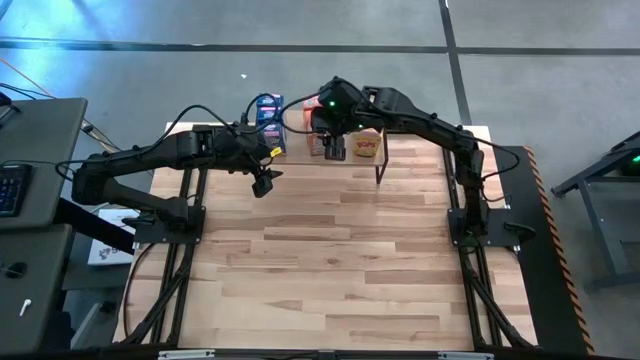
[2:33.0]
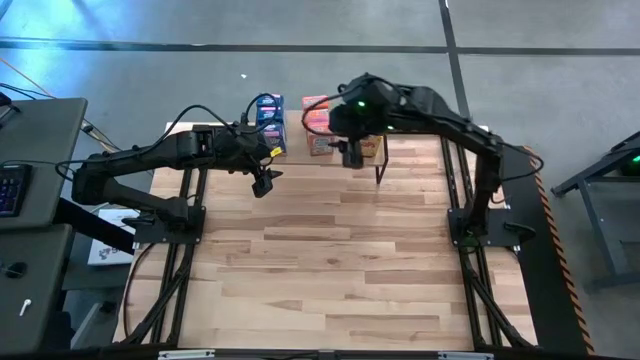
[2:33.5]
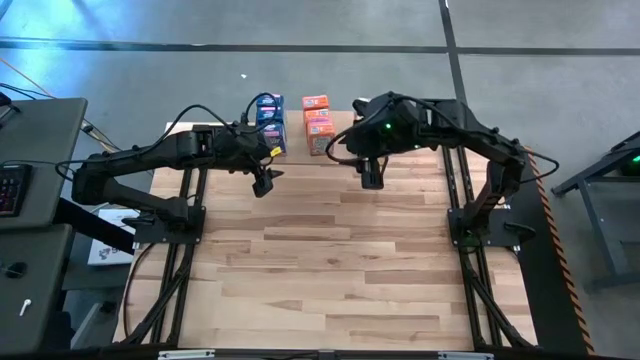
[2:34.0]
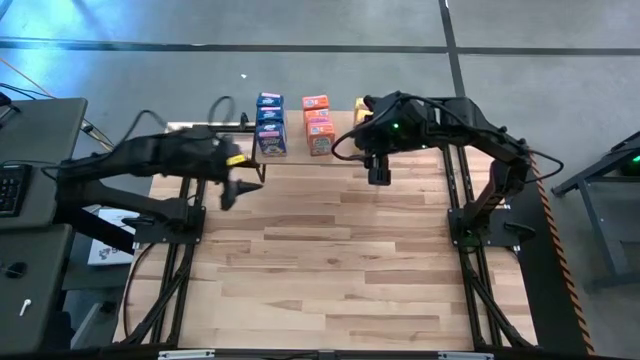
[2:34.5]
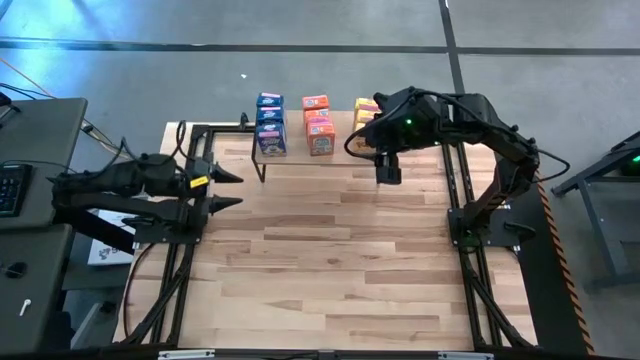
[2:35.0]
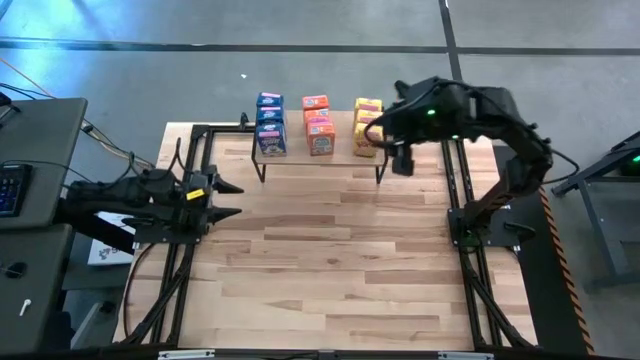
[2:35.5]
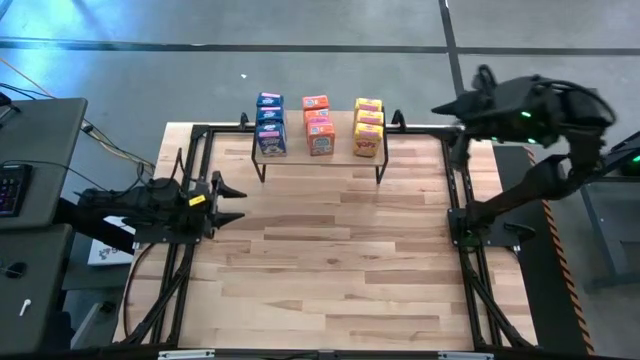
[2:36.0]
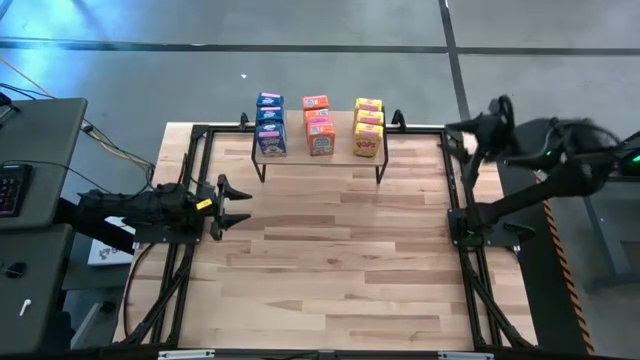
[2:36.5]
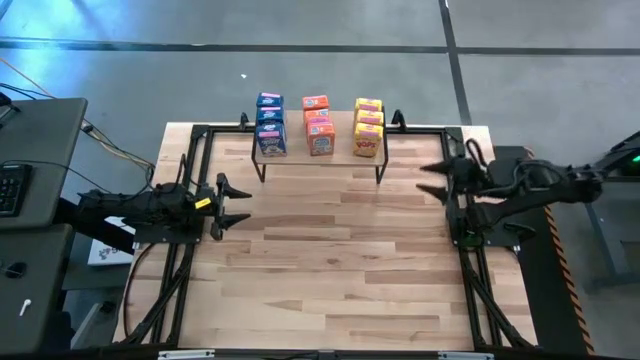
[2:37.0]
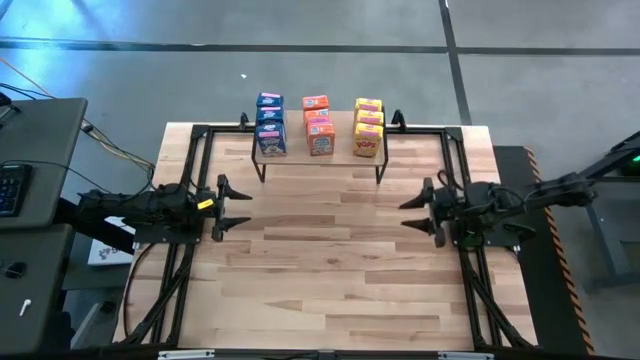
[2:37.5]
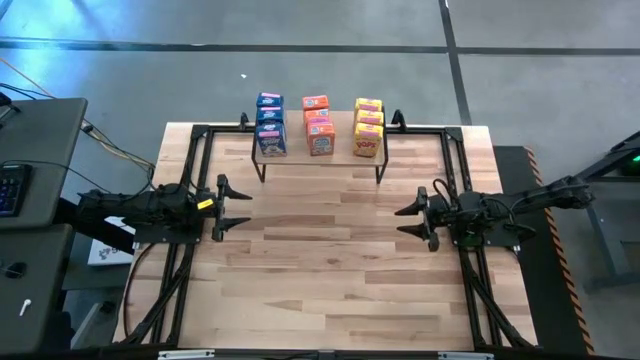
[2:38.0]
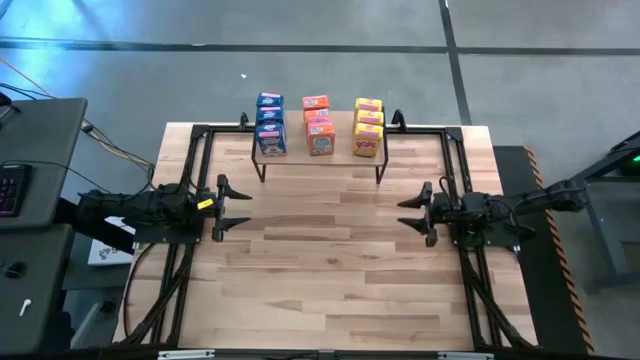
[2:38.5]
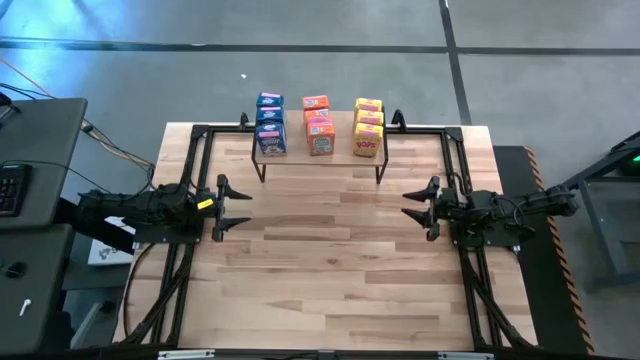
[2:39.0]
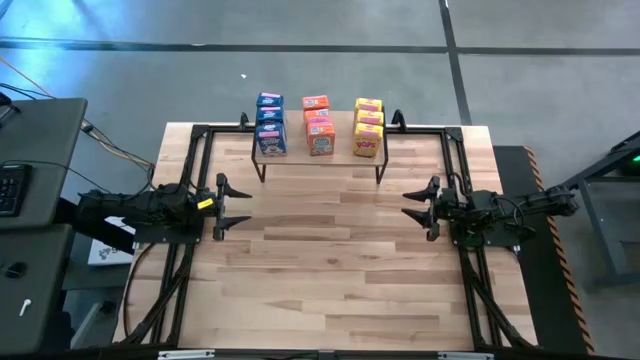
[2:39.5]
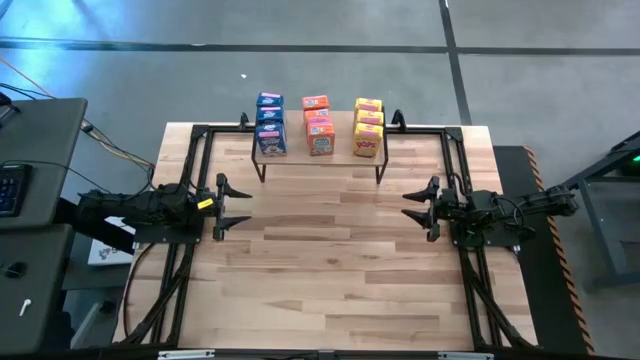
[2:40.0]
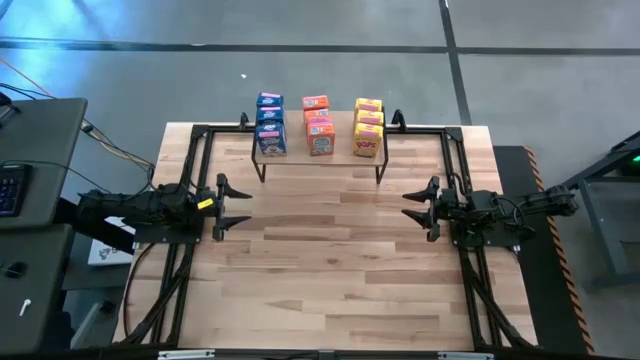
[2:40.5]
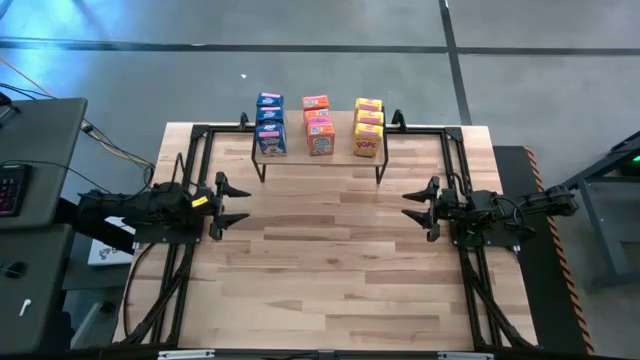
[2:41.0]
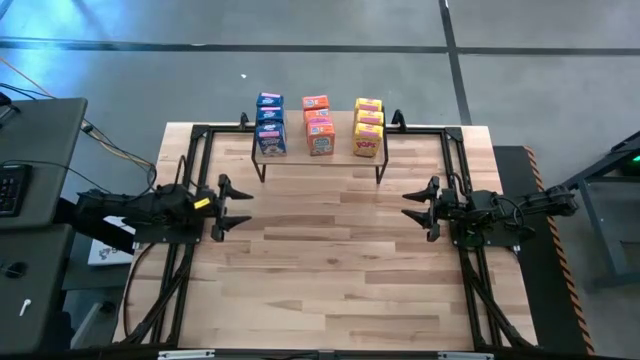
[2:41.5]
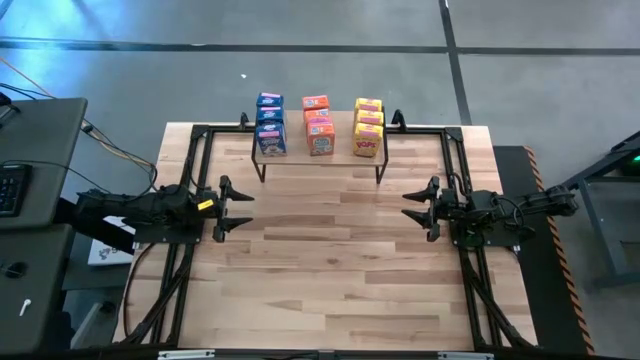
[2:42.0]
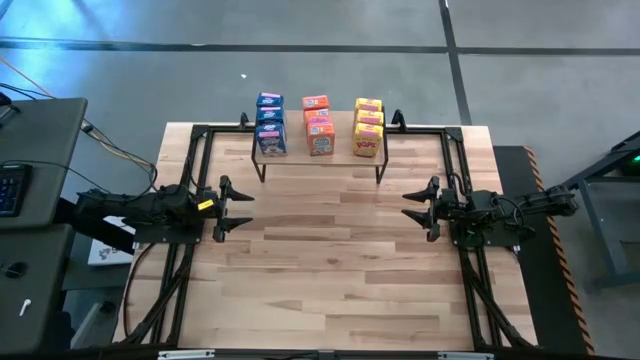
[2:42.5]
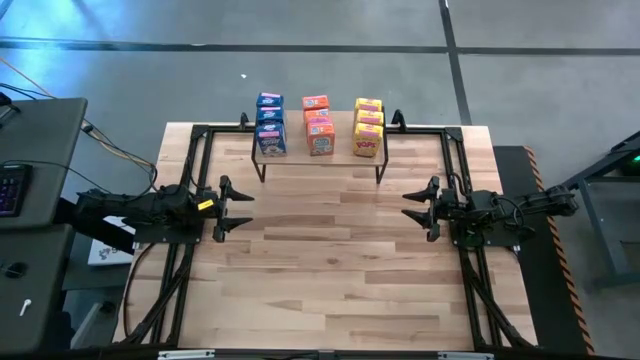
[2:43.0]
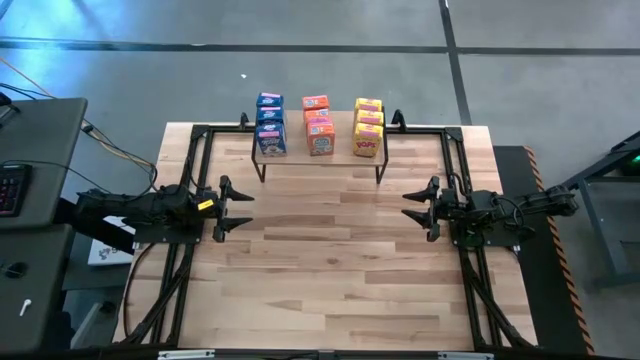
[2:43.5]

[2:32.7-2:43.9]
Task: Stack cereal on shelf
Return to Home Position
